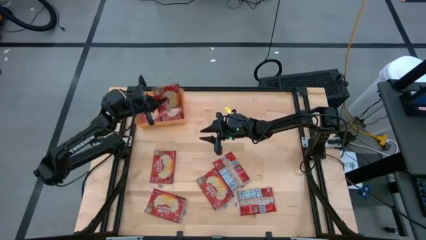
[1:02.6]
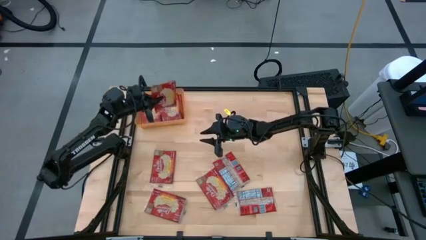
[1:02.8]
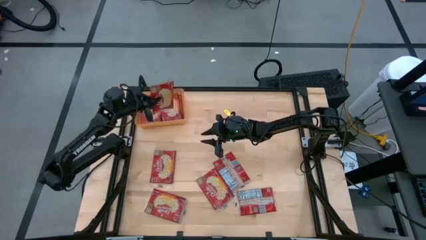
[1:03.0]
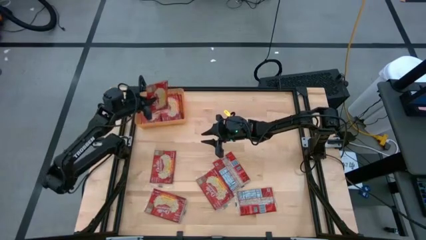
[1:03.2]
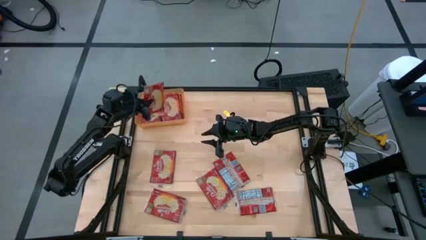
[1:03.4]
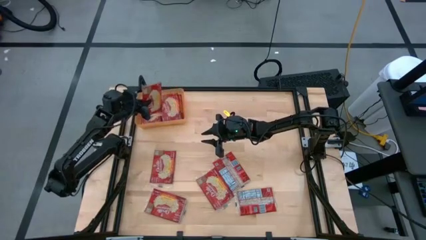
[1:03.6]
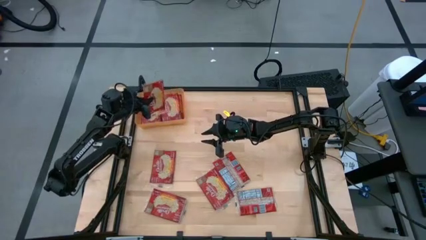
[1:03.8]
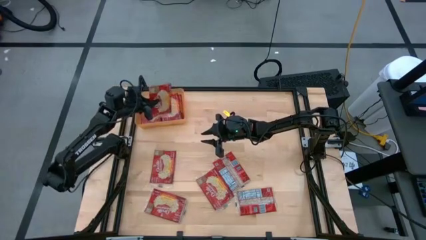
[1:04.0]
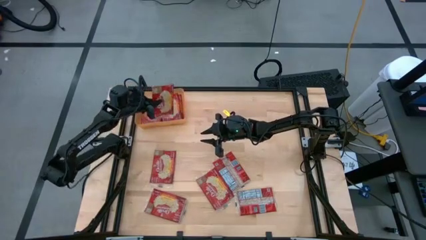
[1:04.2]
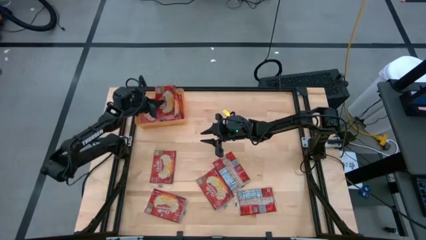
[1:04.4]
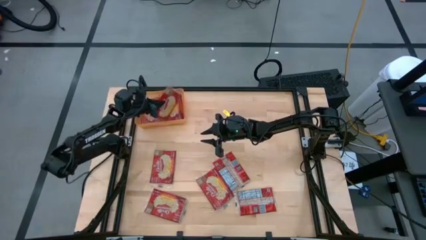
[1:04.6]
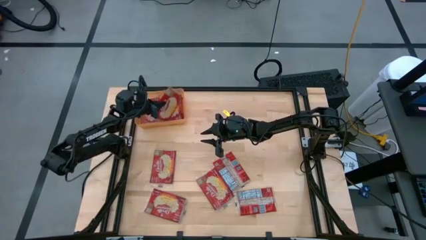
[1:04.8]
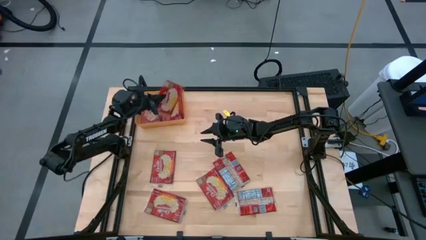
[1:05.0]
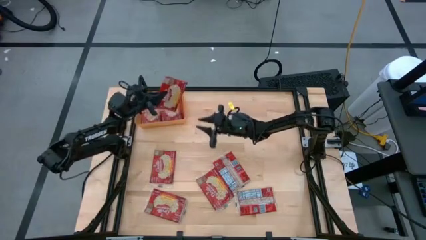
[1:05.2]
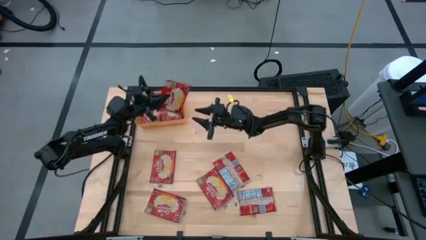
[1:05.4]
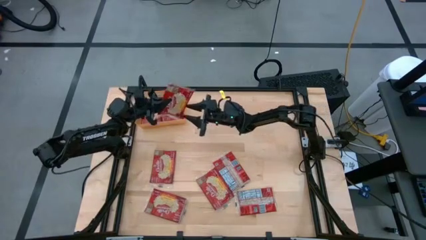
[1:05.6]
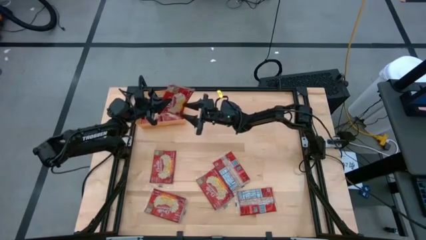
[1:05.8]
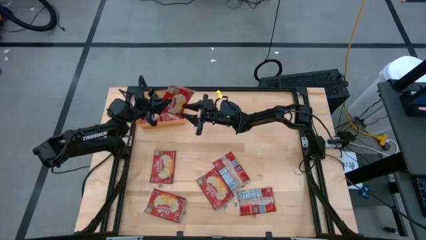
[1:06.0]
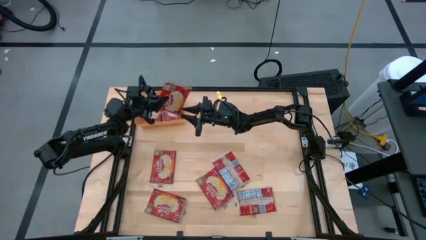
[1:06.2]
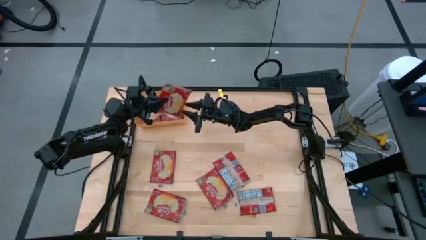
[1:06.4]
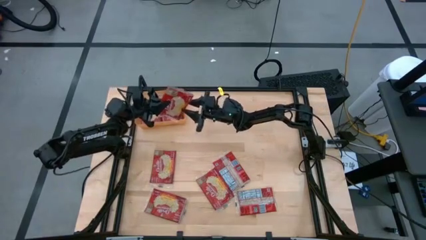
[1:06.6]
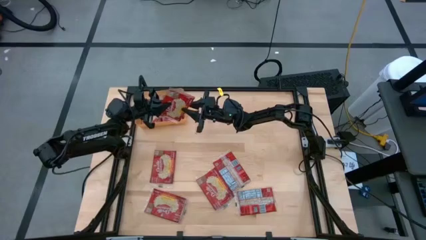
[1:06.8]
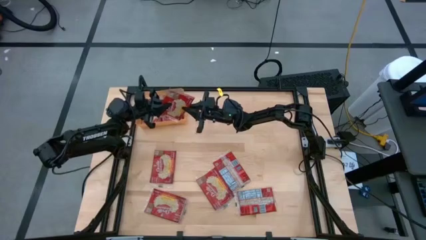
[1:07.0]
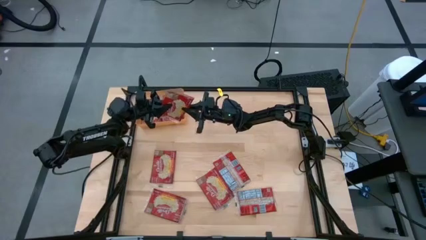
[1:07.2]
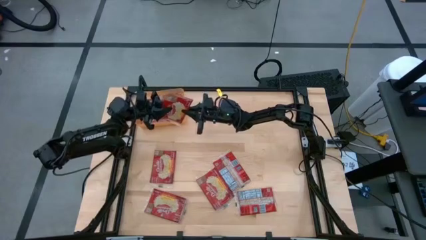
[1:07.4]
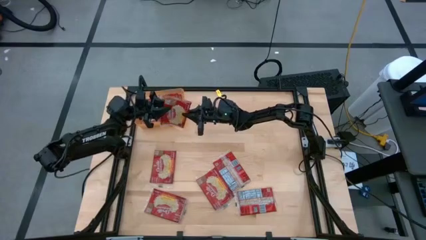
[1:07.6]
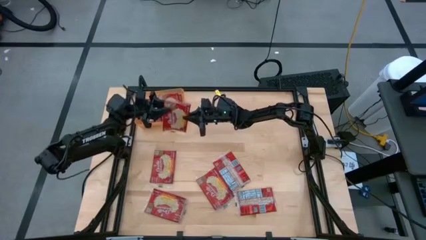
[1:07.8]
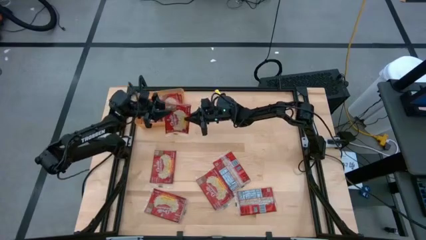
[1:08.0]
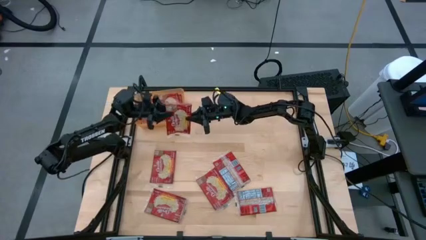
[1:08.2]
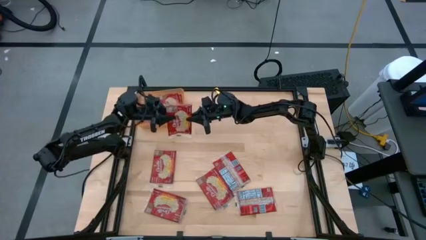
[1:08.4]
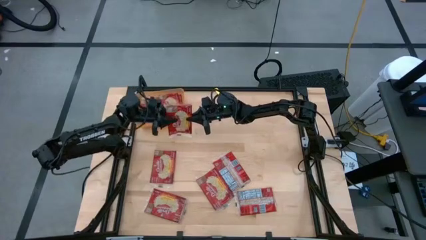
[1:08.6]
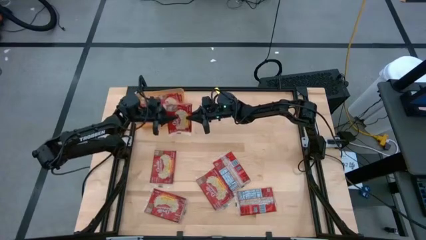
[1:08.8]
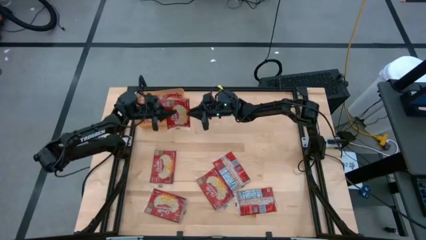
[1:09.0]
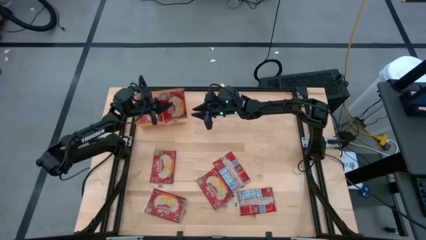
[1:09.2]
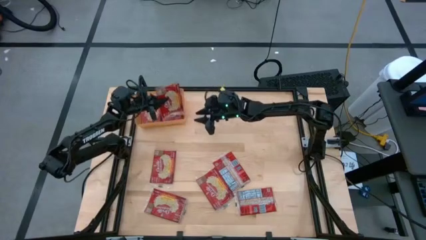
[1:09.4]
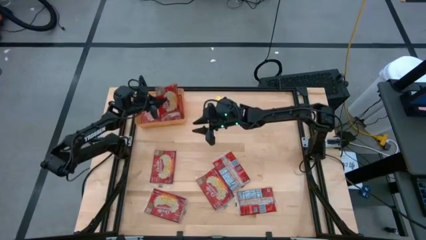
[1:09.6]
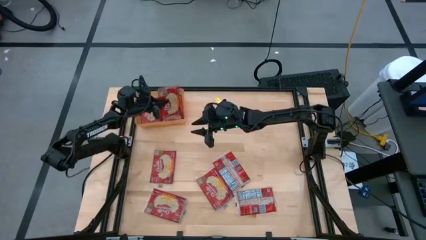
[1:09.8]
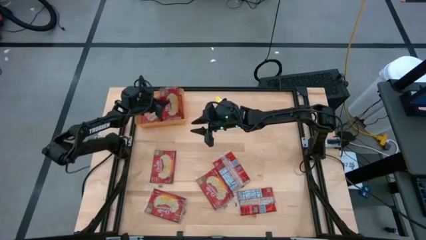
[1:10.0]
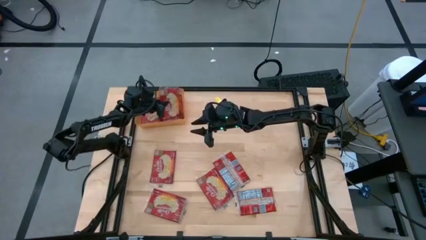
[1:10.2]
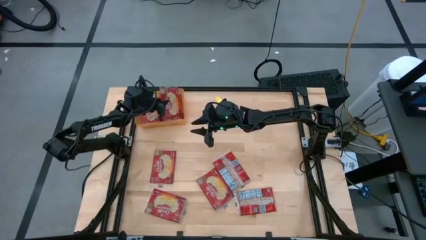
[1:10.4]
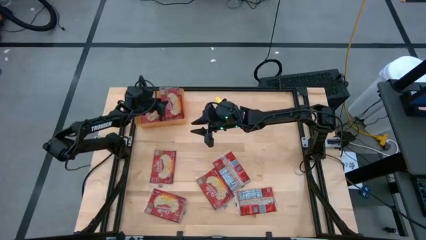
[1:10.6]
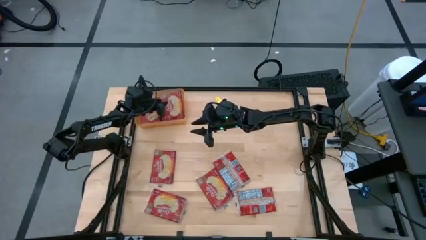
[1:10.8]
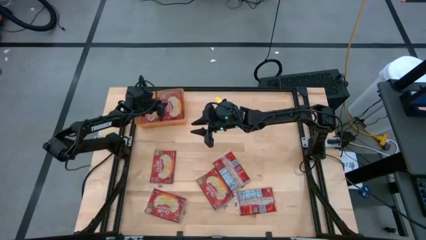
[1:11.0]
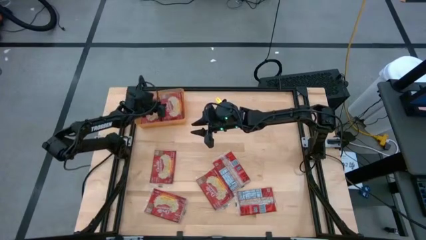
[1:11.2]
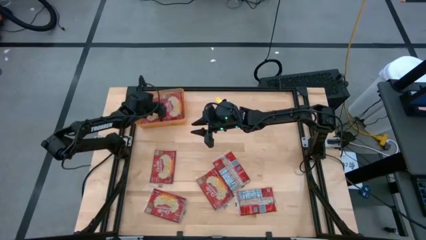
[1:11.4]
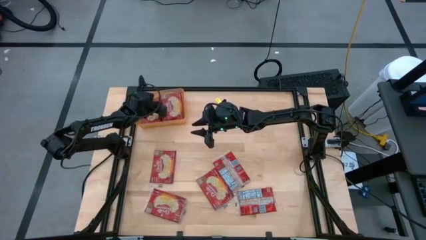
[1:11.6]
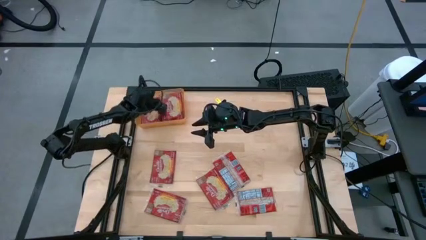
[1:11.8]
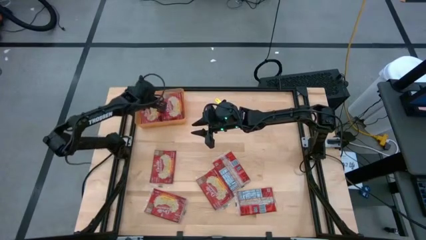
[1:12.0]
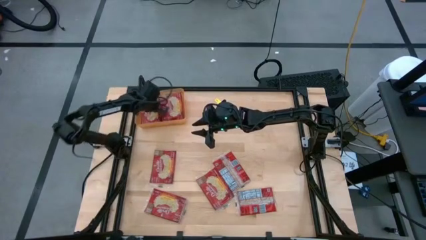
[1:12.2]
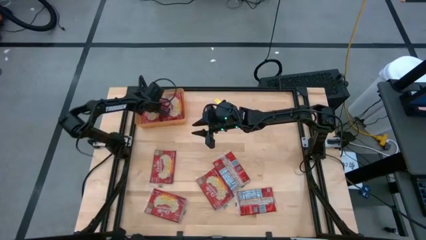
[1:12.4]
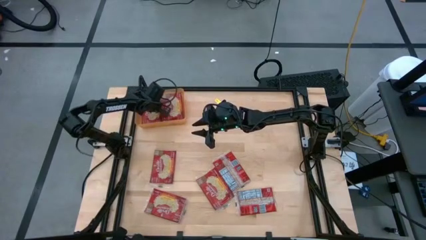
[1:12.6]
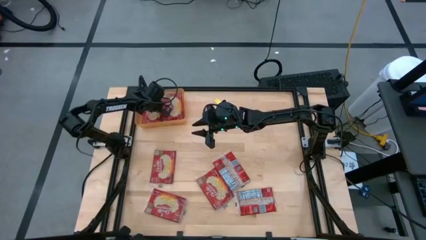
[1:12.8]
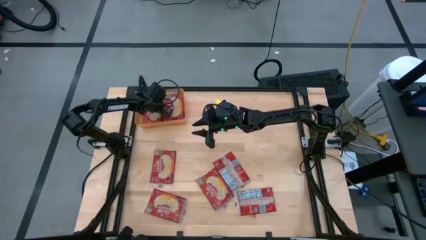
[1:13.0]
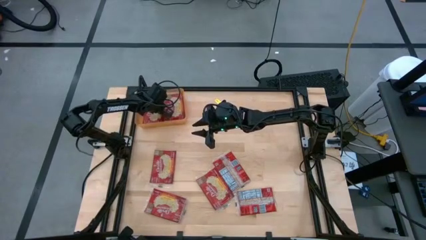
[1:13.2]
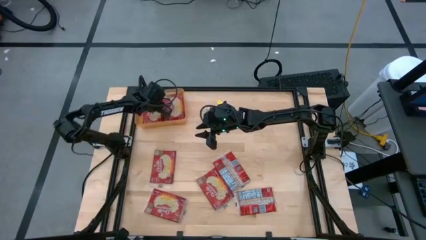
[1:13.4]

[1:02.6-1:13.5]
Task: Sort popcorn bags into baskets
Put the red popcorn bag into the orange bin
